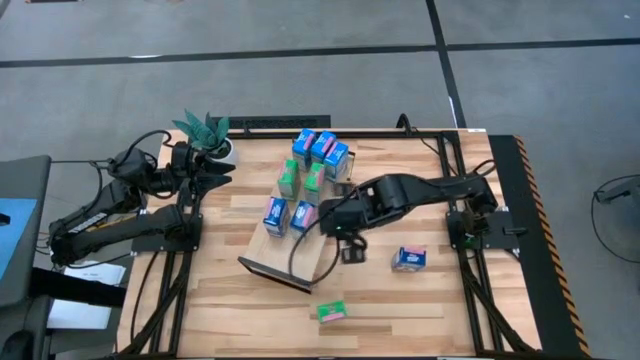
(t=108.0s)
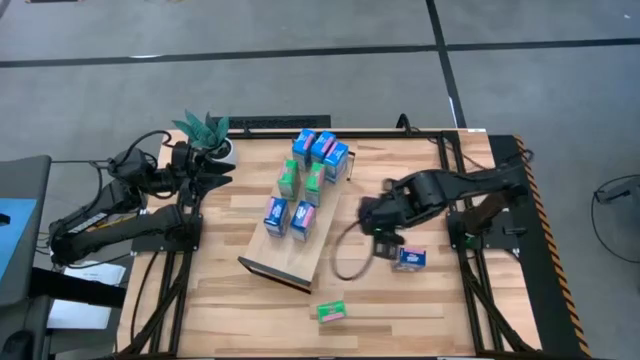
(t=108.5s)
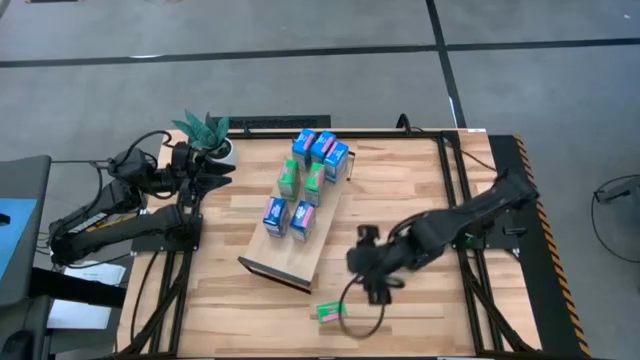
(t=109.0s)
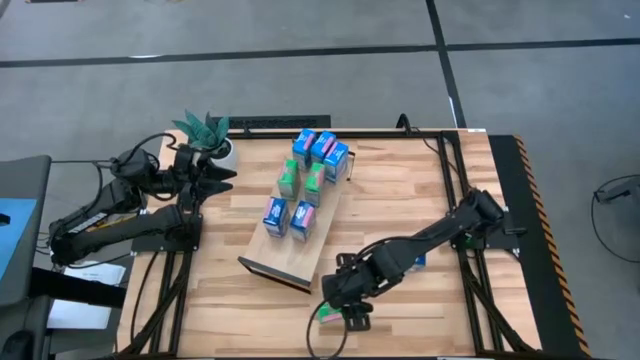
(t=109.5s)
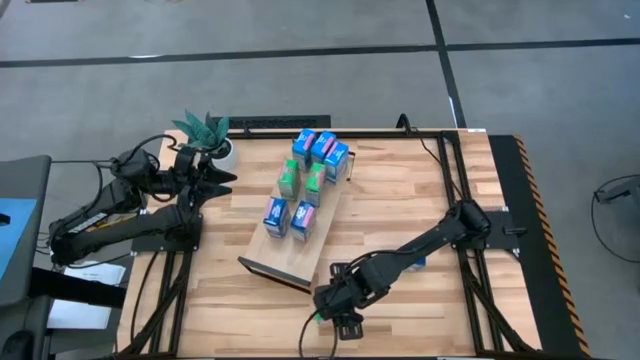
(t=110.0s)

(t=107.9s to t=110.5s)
Task: Stack cereal on shelf
Put the green cereal box on the shelf aligned with the other green cereal boxes

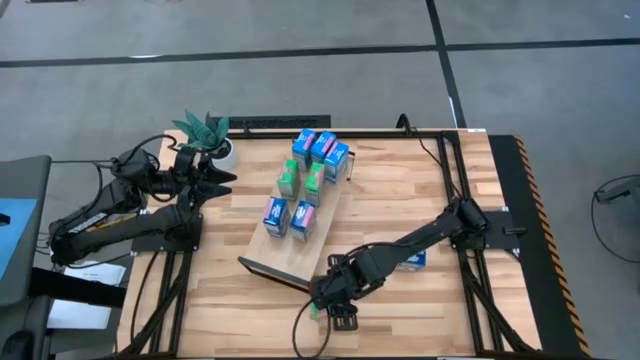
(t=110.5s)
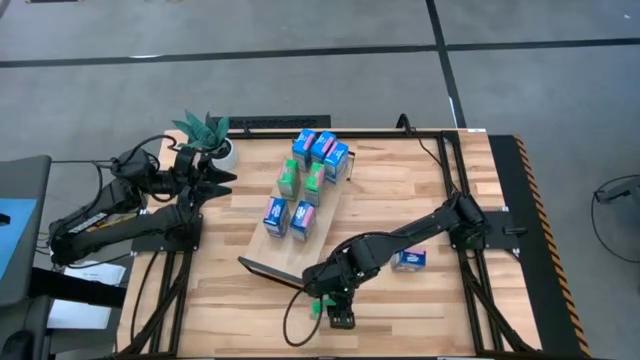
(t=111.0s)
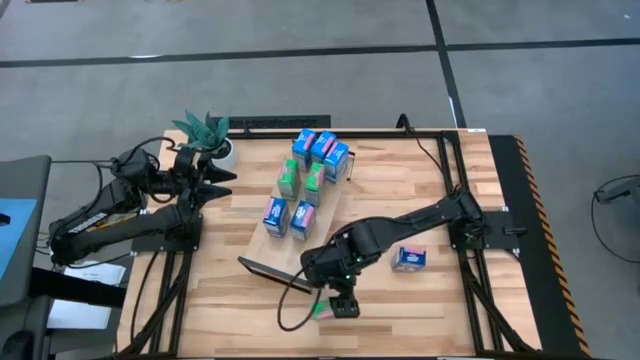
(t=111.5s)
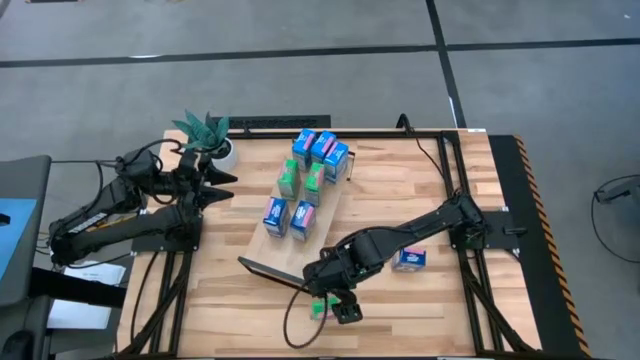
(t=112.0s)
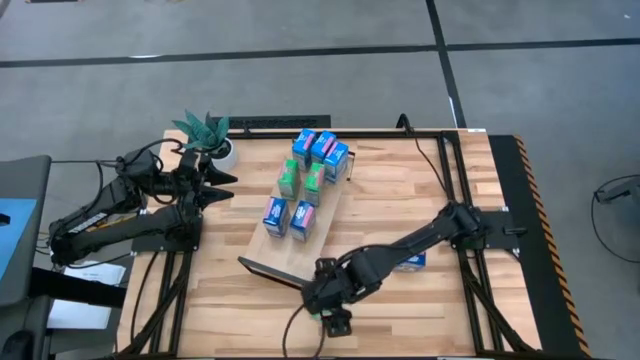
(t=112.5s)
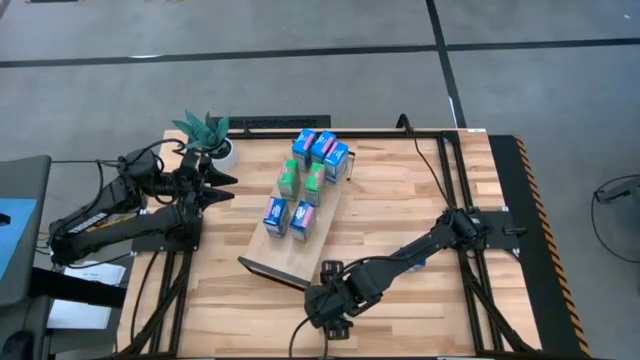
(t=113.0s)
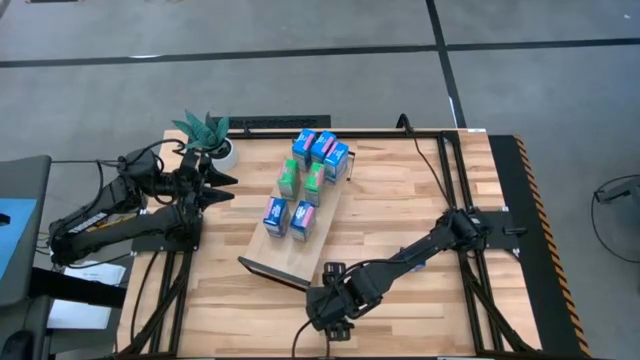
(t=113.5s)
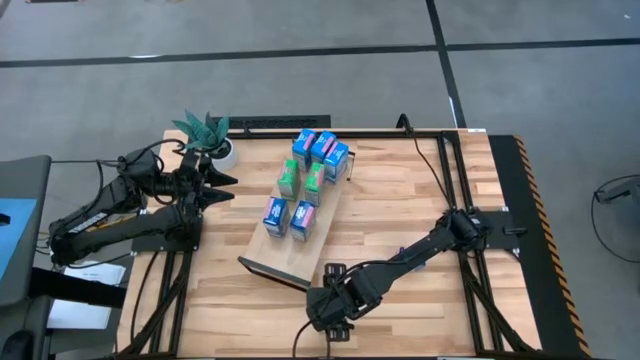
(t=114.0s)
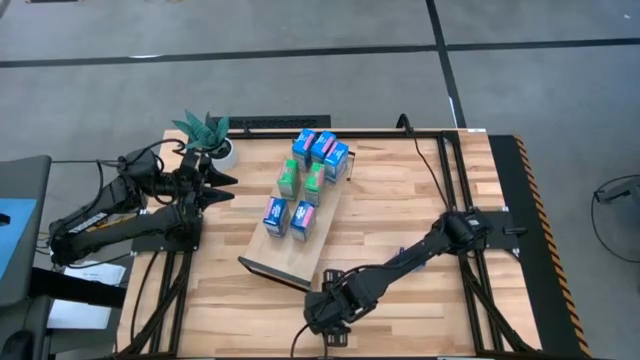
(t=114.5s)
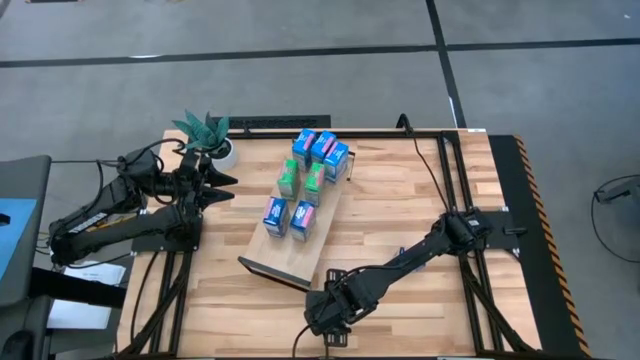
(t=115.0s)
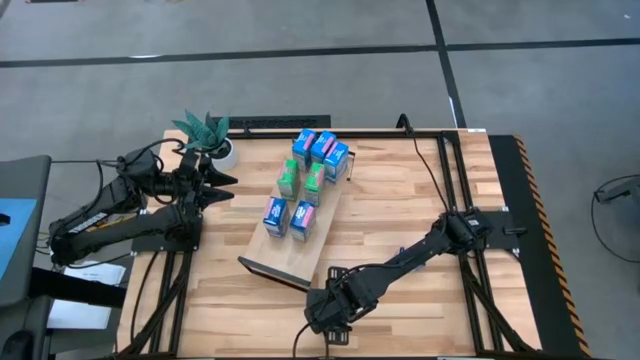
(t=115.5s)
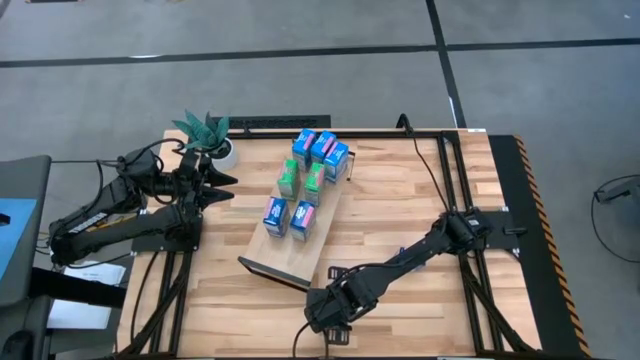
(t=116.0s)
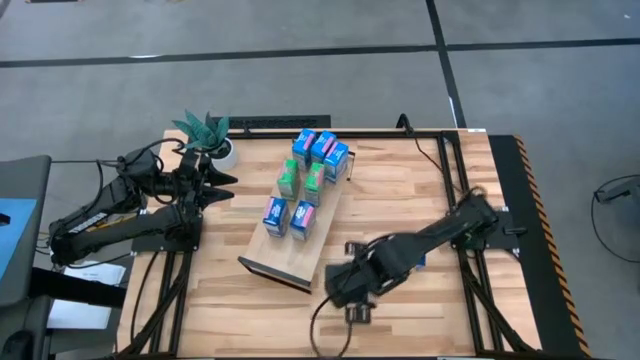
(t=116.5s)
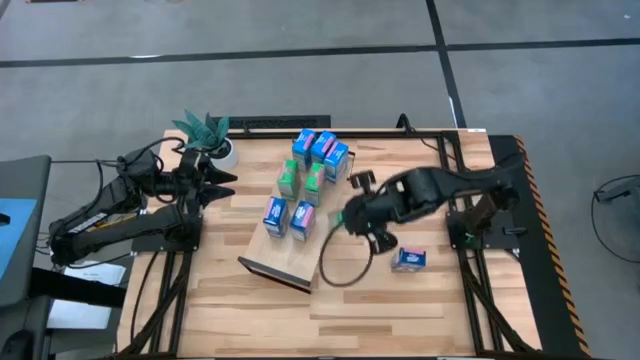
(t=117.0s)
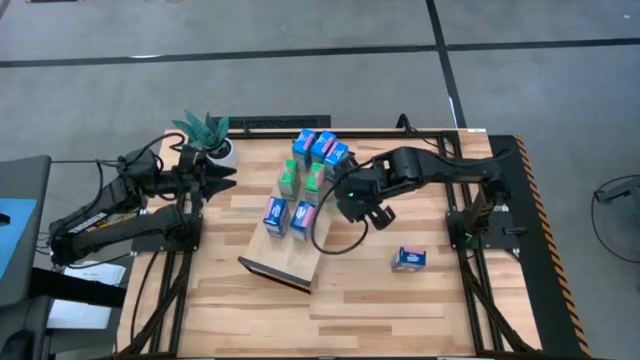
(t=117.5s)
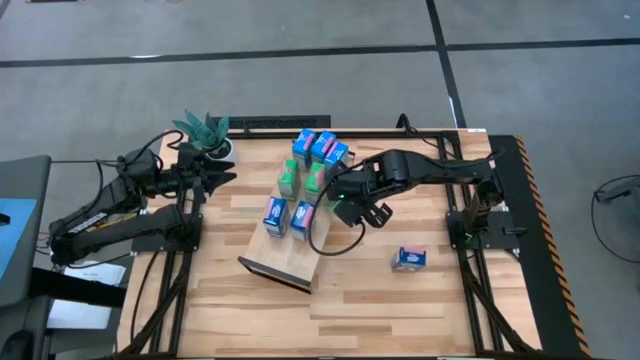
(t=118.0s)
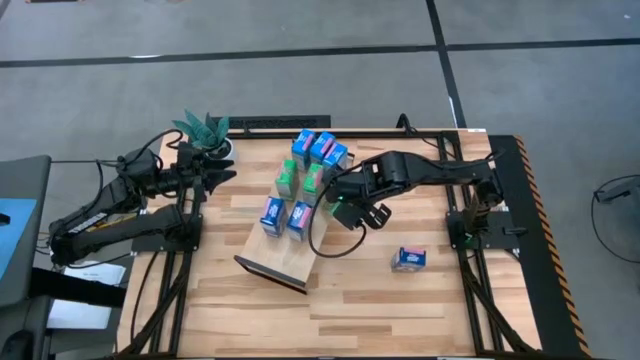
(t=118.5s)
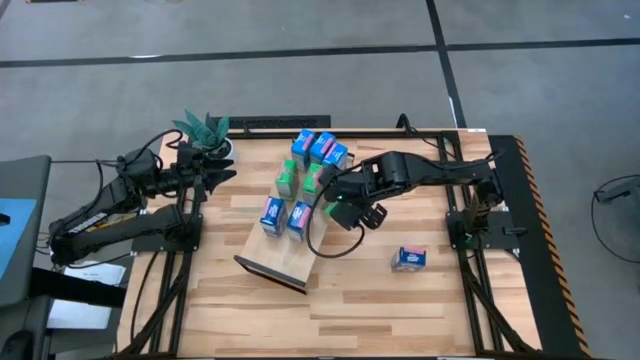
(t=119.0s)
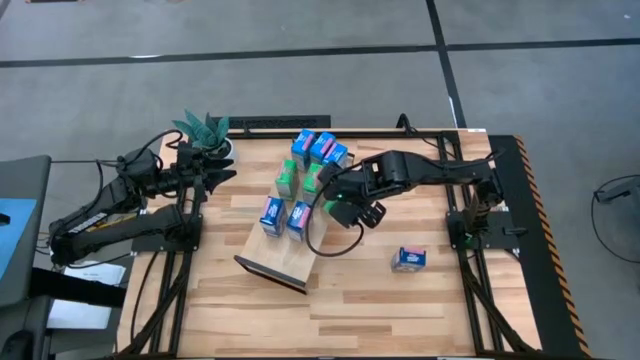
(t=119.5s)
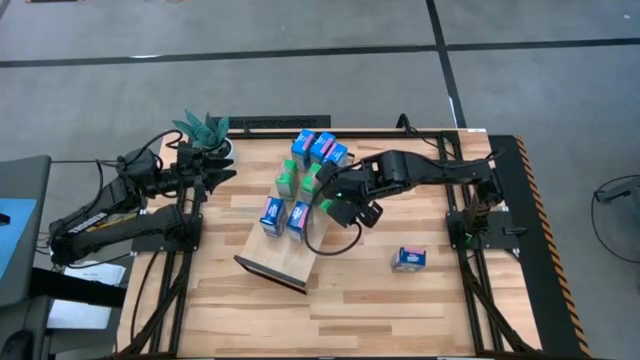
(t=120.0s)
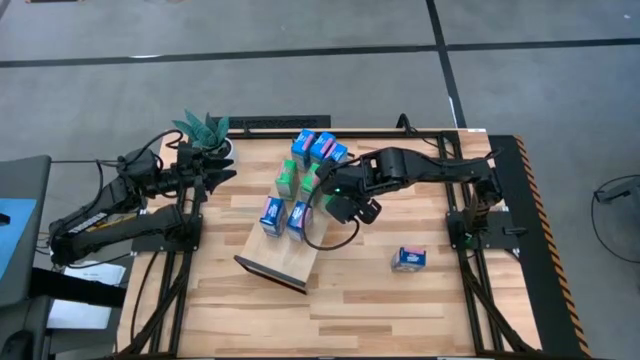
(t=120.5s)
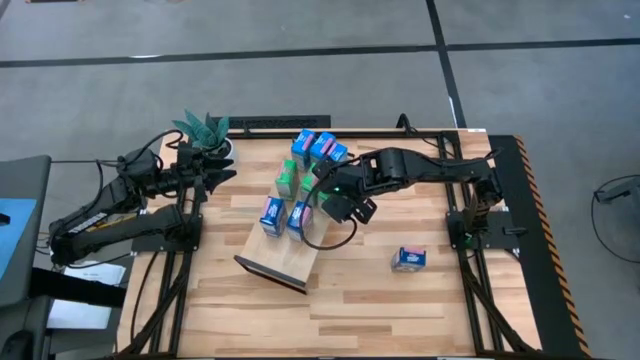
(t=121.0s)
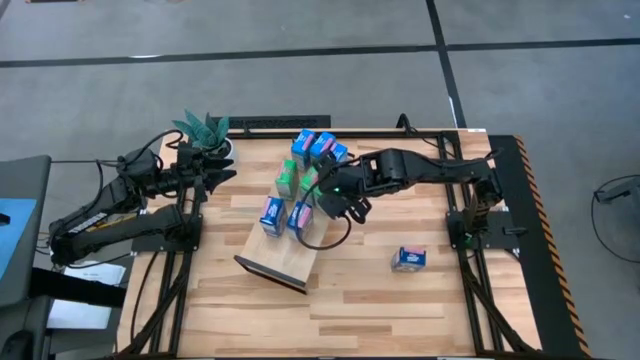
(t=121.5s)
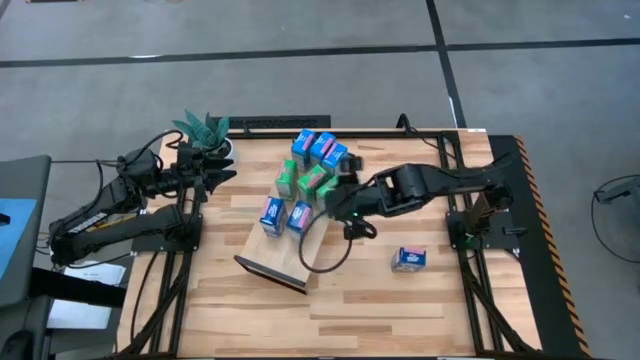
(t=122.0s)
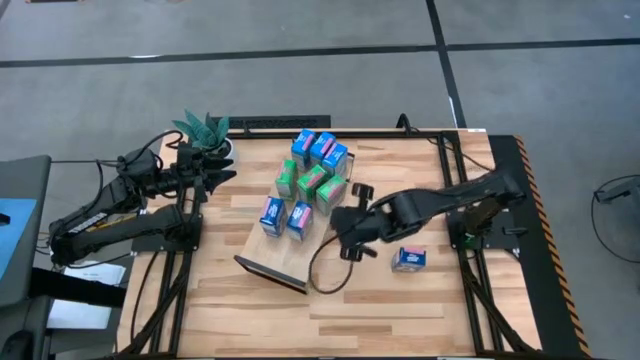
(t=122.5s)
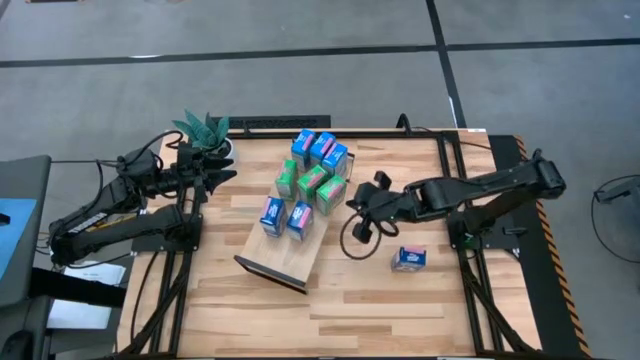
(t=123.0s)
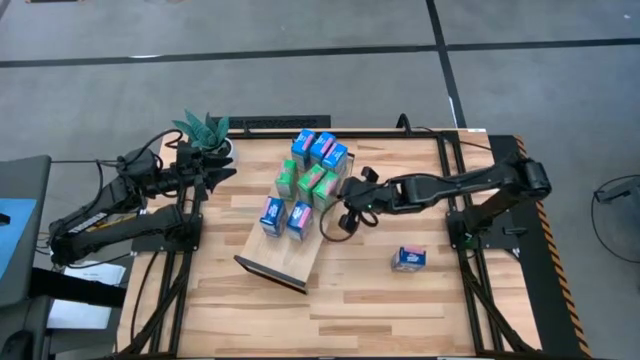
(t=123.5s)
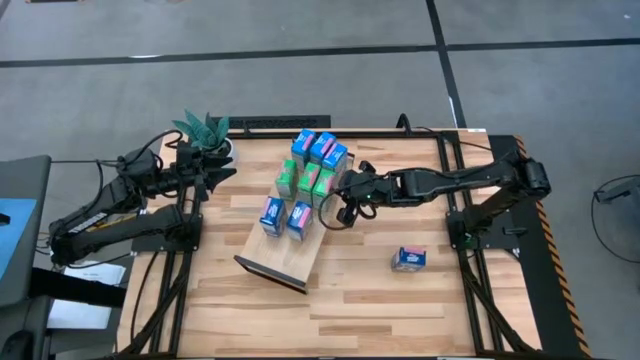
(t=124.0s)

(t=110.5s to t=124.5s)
Put the green cereal box on the shelf aligned with the other green cereal boxes

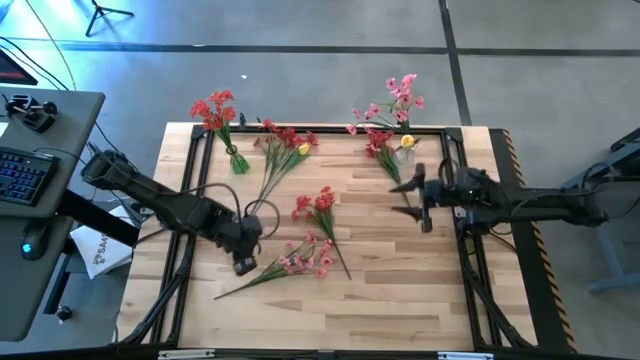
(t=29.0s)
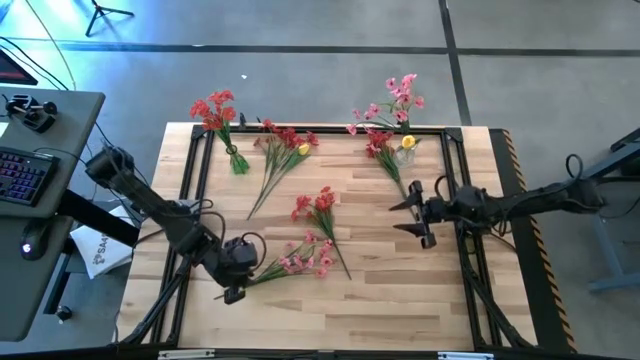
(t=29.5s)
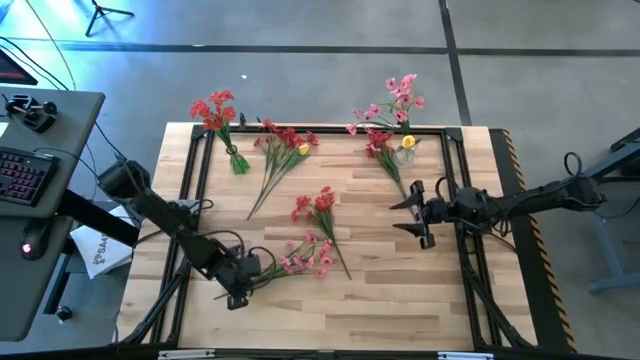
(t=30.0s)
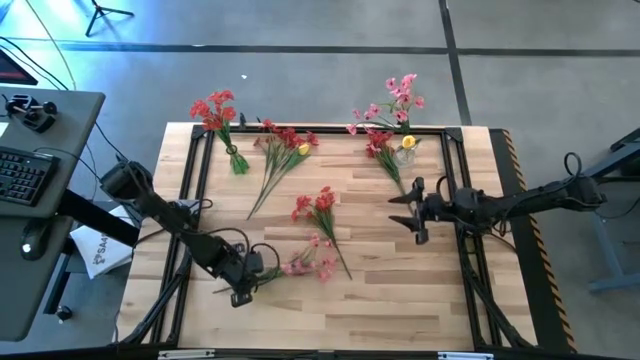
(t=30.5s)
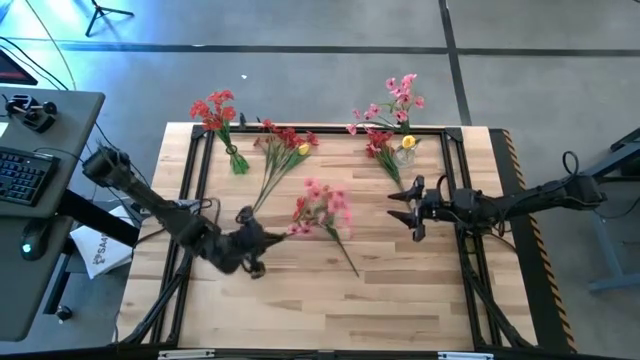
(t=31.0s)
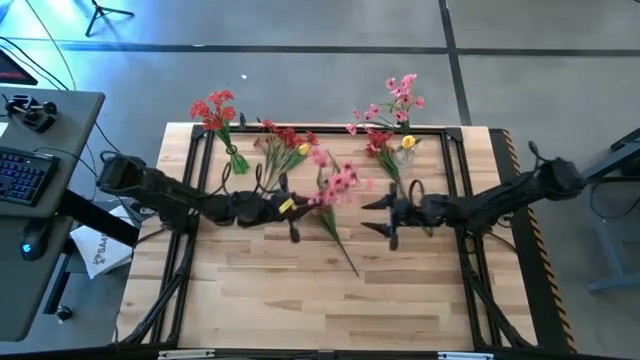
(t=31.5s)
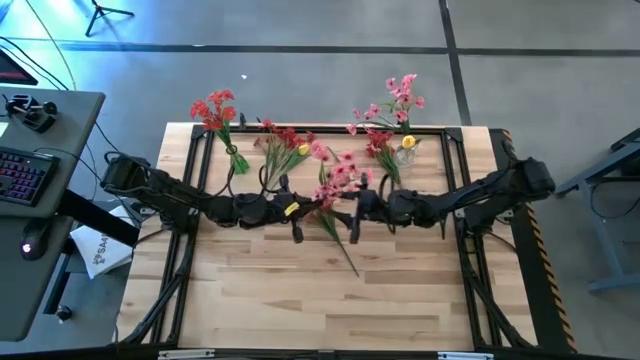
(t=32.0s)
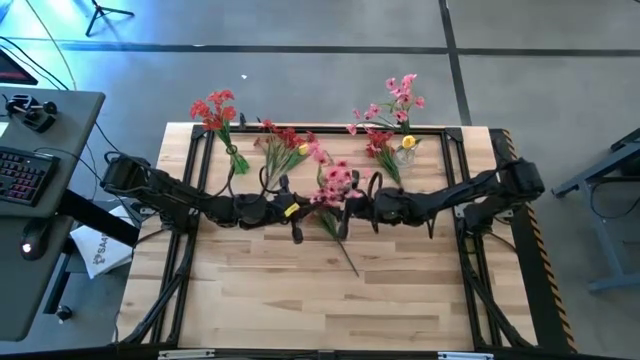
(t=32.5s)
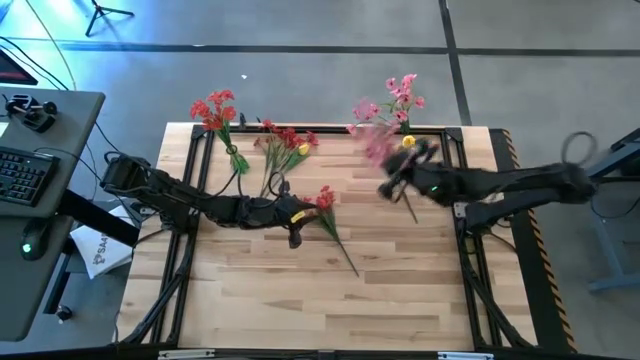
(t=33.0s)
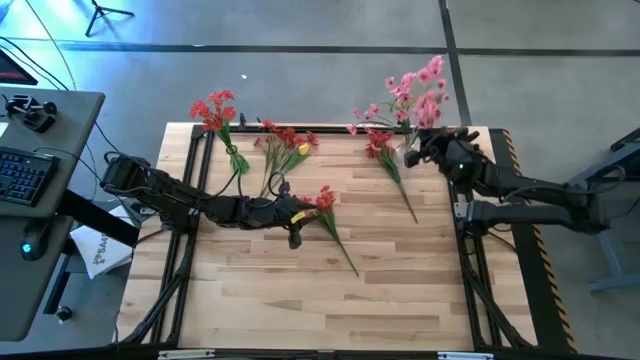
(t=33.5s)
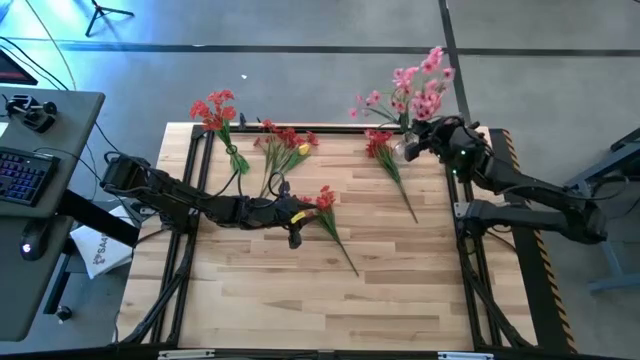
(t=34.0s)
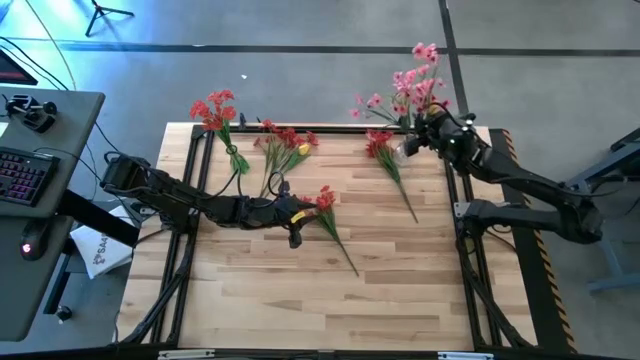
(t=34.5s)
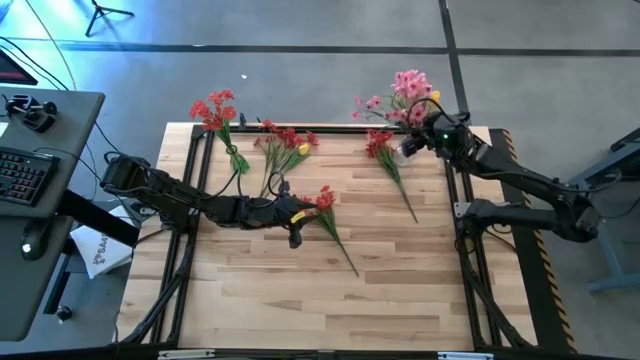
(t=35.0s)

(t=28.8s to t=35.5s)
Task: Sort flowers into vase by color
Put the pink flowers into the transparent vase
